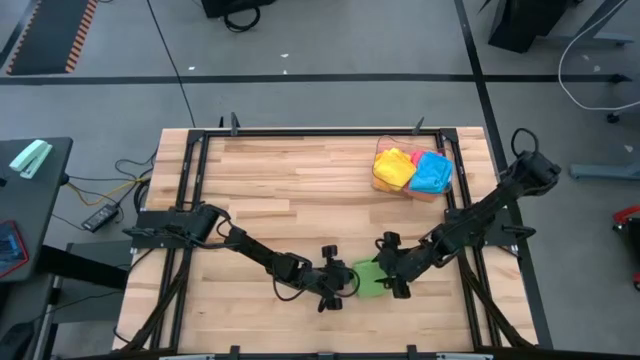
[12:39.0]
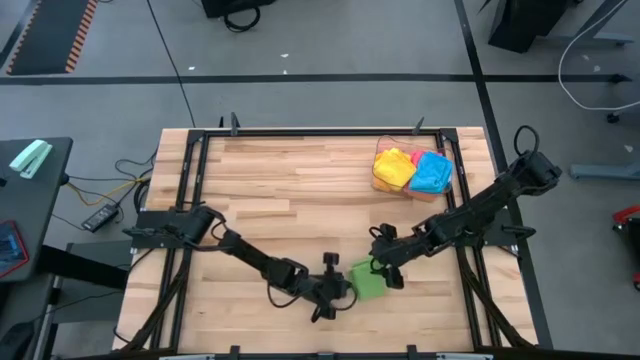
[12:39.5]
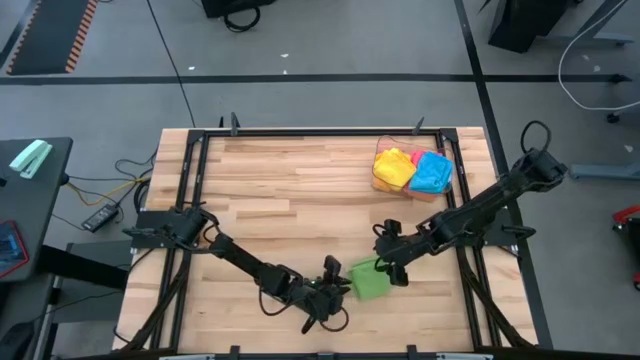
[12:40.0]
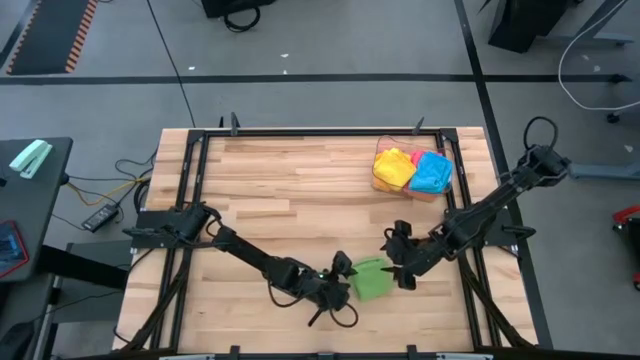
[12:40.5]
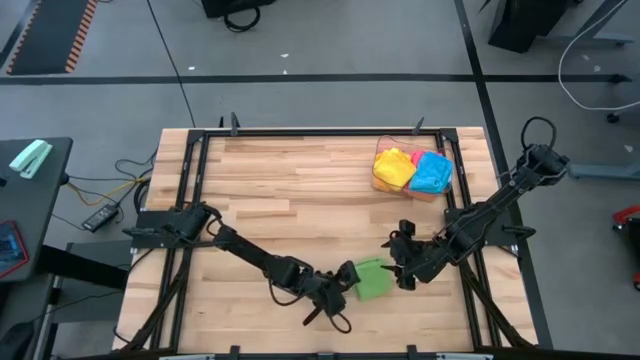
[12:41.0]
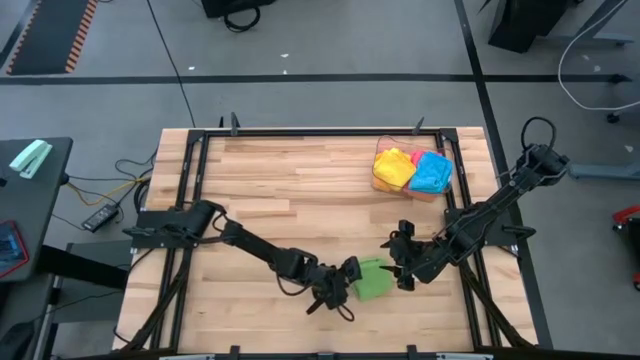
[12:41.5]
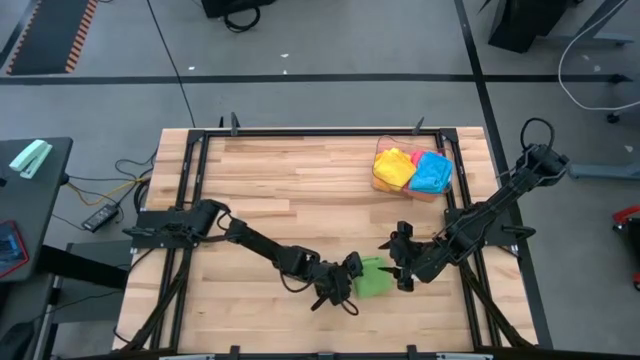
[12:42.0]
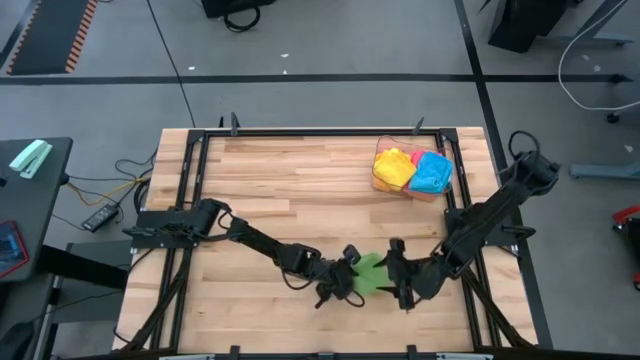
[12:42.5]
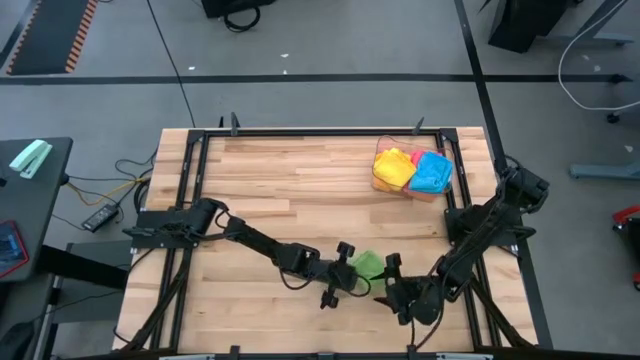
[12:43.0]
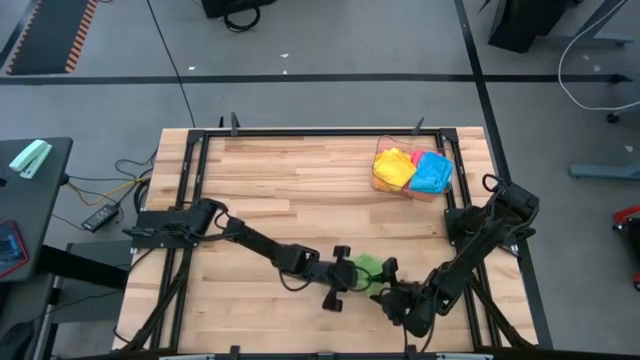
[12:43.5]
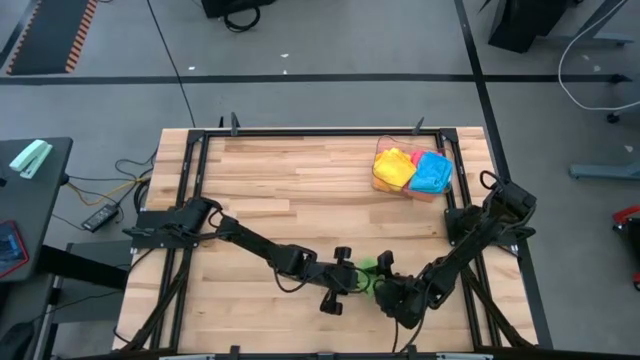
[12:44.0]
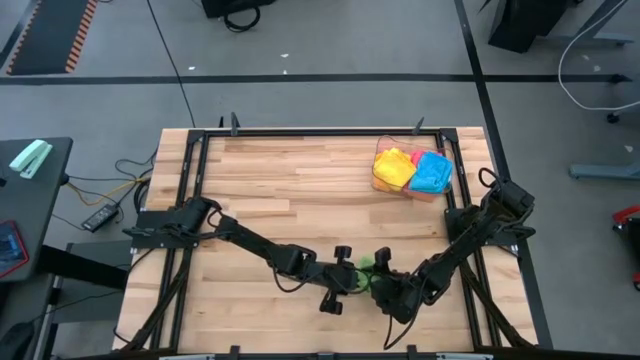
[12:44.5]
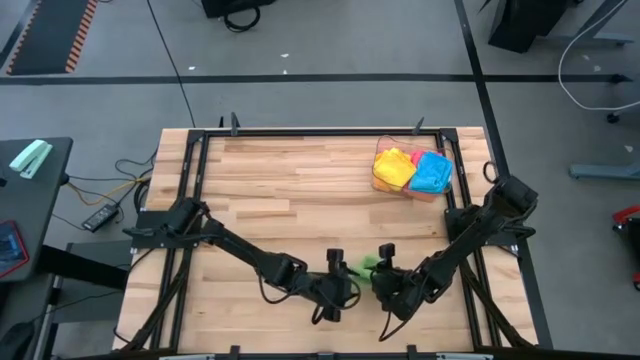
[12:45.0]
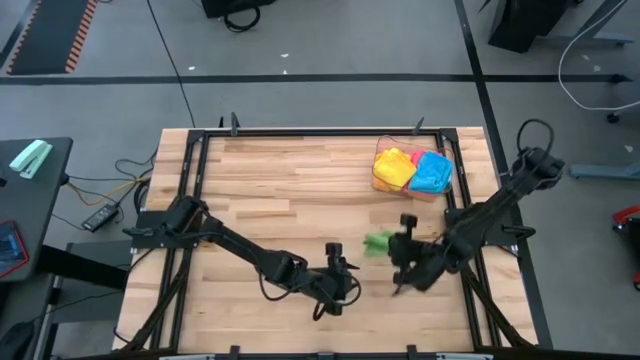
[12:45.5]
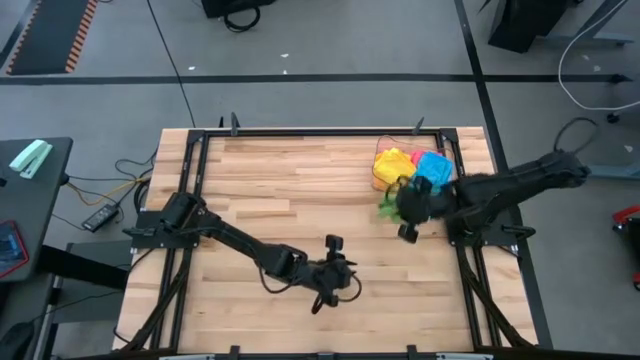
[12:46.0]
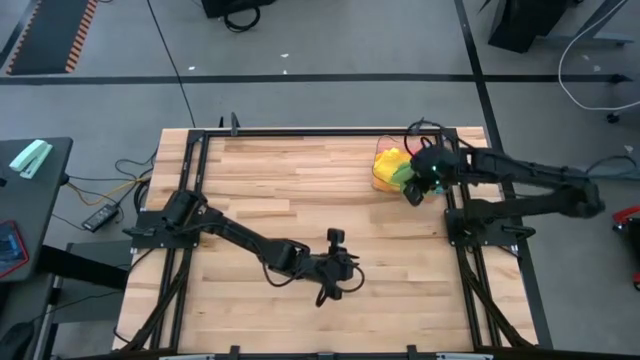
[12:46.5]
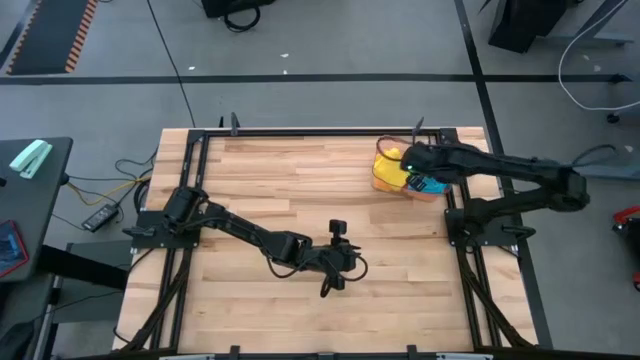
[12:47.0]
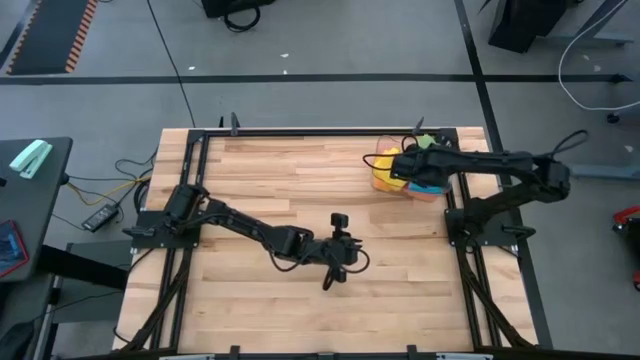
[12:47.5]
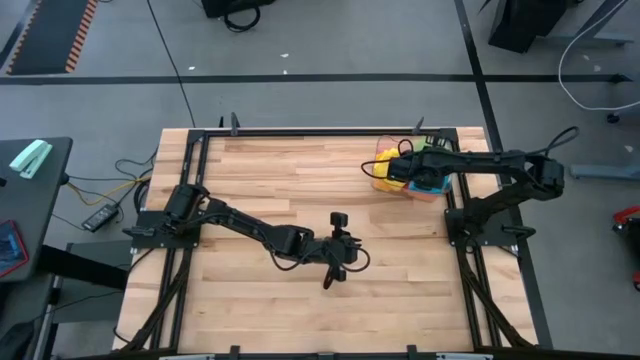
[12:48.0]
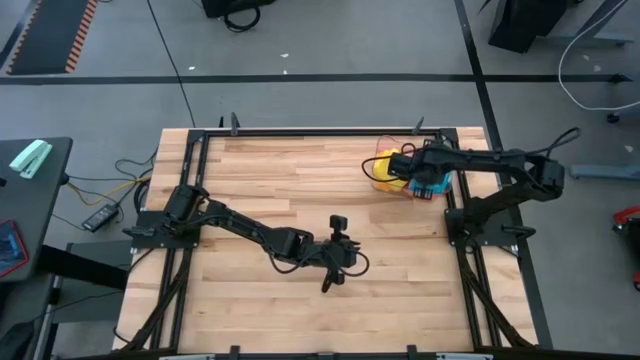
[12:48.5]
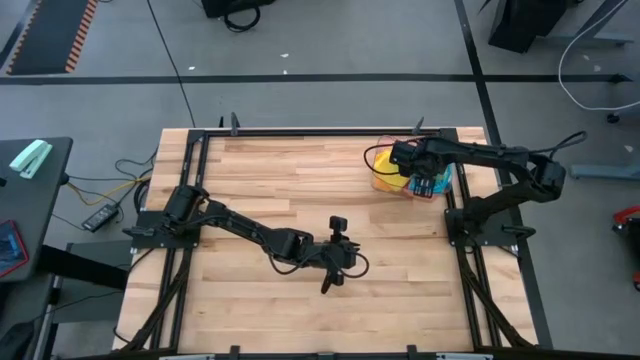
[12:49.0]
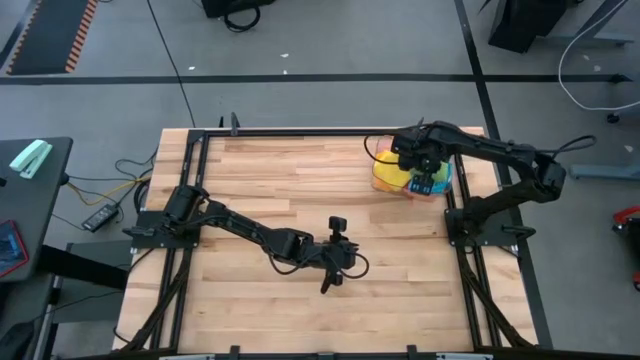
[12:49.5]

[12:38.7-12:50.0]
Task: Fold microfiber towels
Stack the folded green microfiber cloth on top of the folded blue microfiber cloth

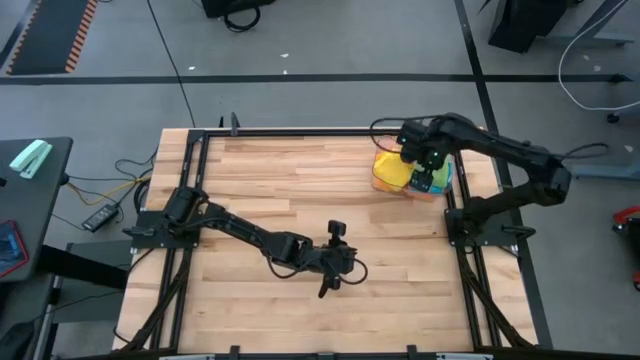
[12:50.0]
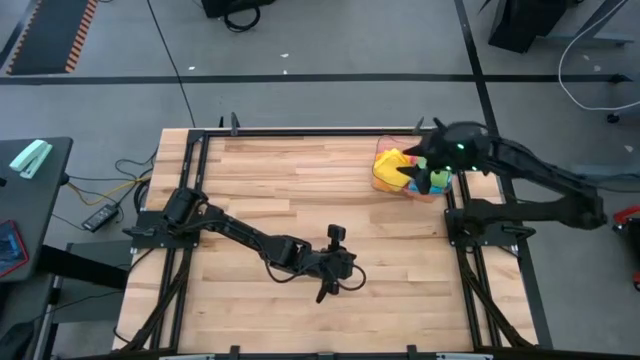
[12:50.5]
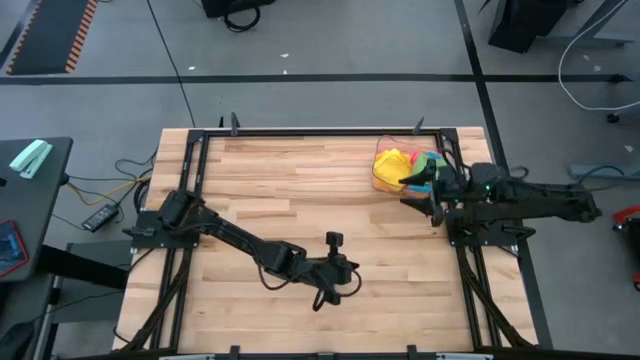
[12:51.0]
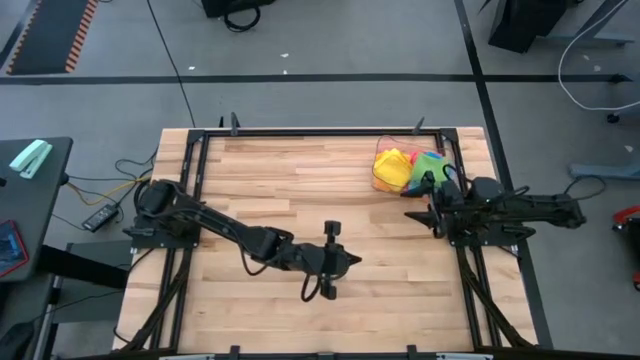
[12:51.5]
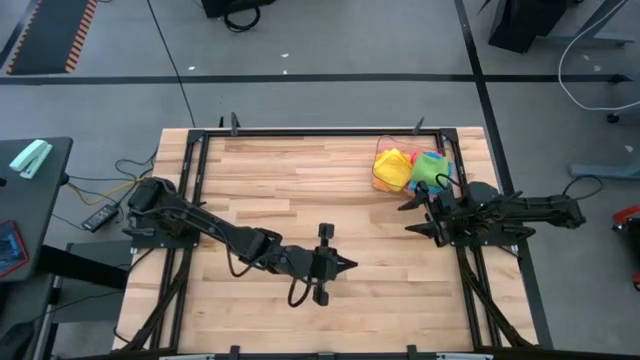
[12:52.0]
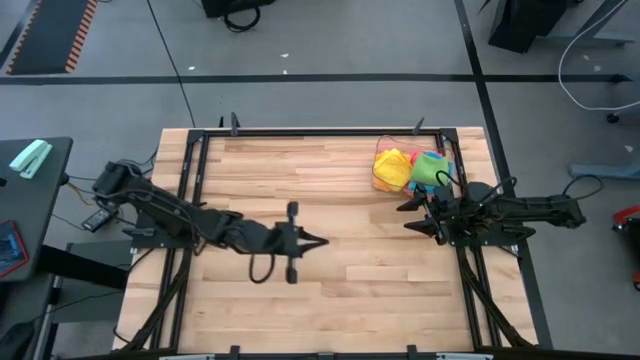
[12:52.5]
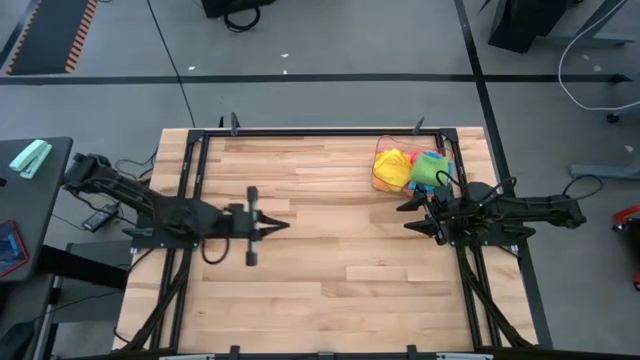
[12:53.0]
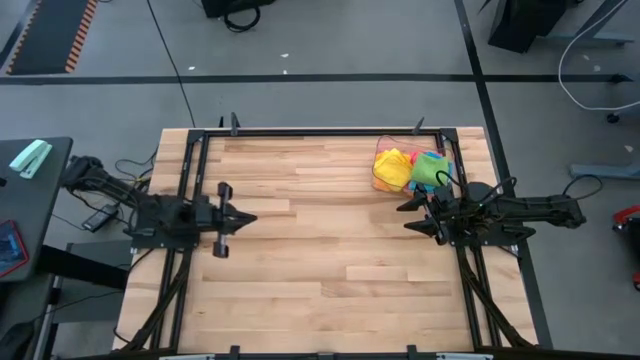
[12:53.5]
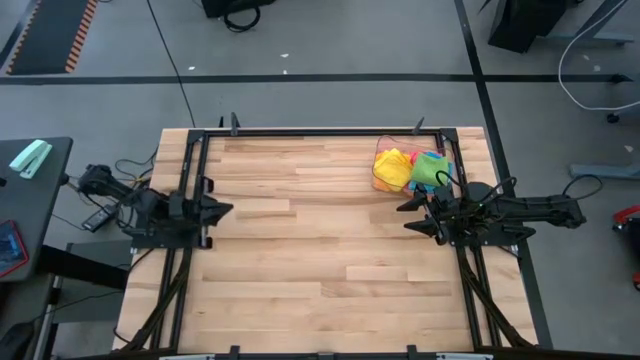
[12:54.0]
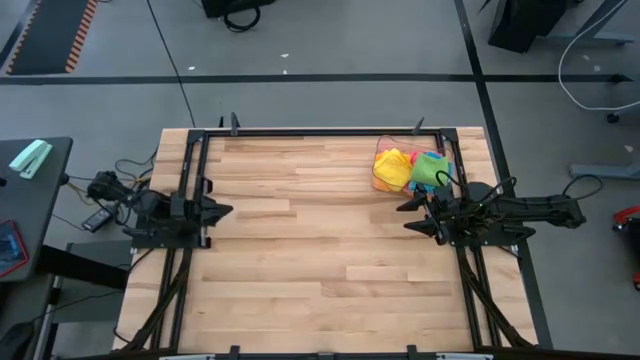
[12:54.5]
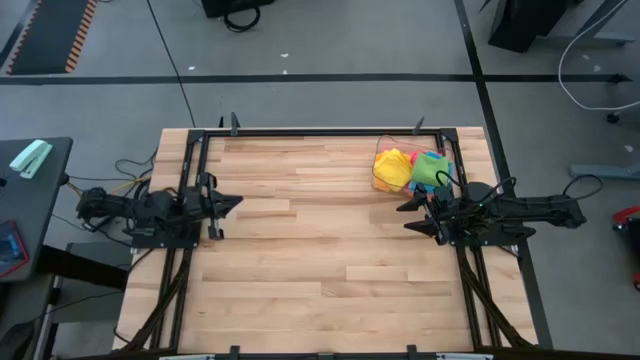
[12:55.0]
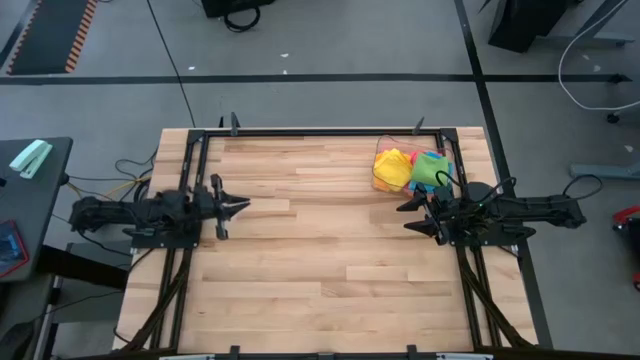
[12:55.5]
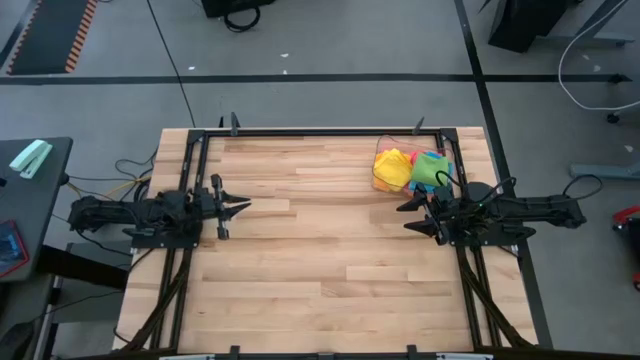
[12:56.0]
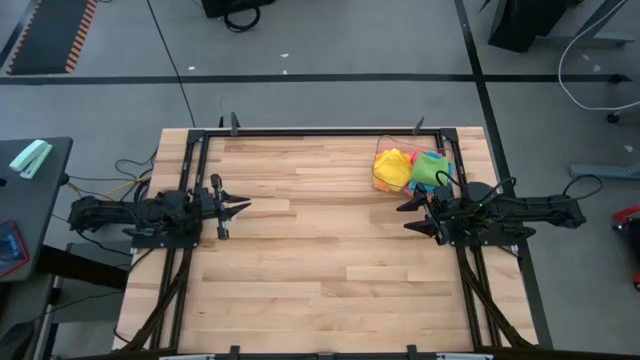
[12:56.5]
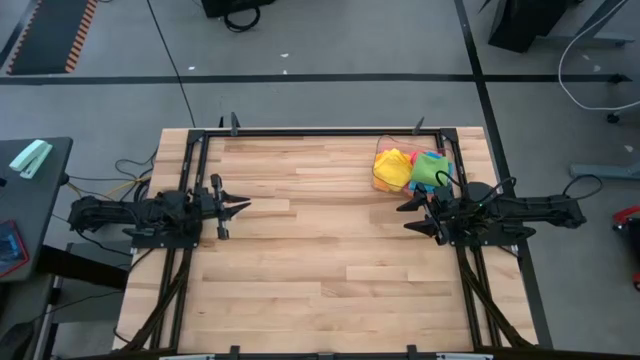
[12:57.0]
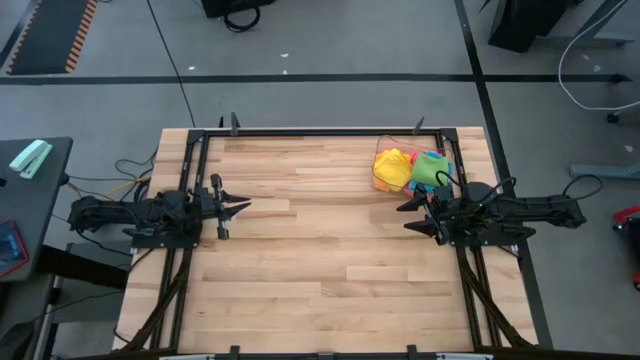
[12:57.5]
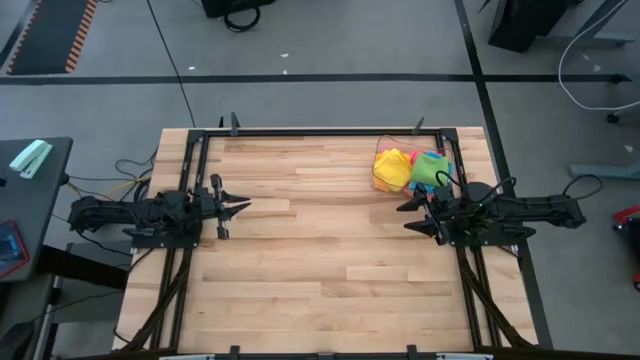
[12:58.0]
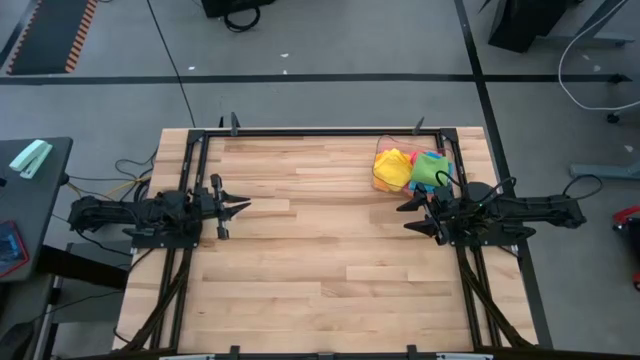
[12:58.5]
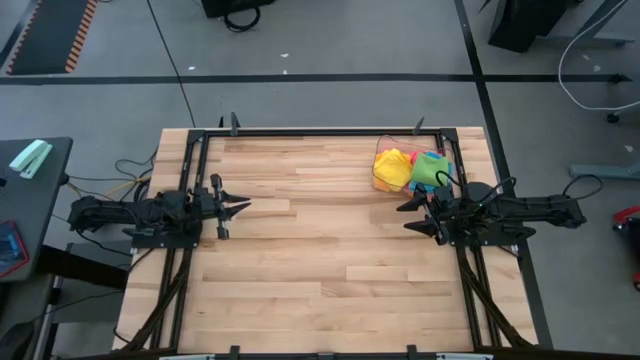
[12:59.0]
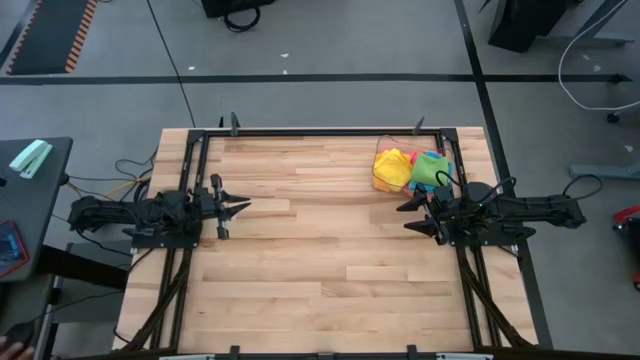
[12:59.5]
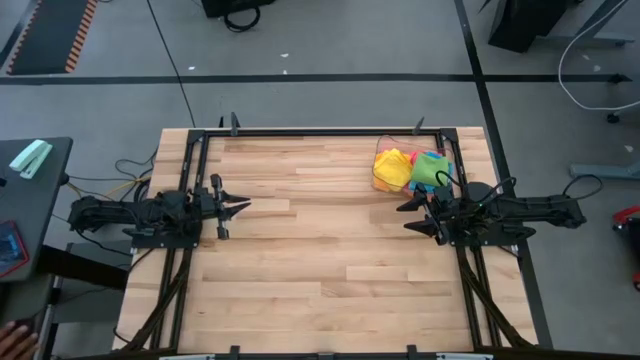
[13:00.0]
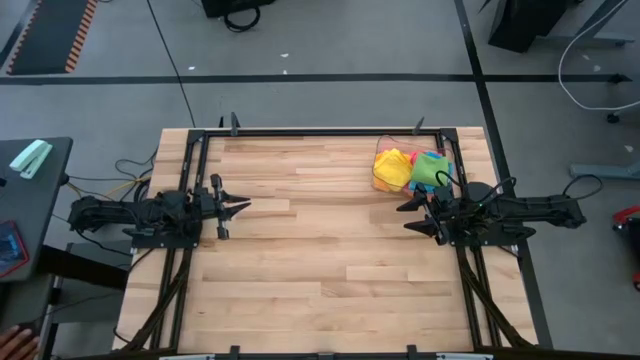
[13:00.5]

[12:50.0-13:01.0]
Return to Home Position
